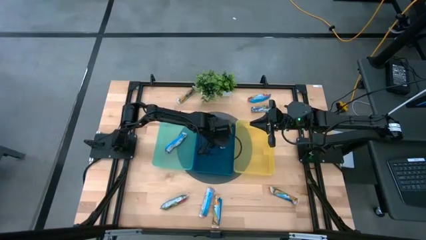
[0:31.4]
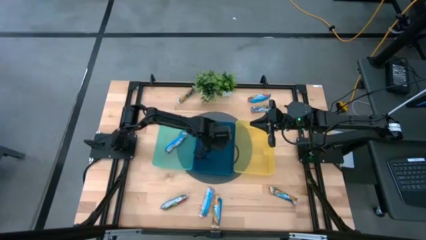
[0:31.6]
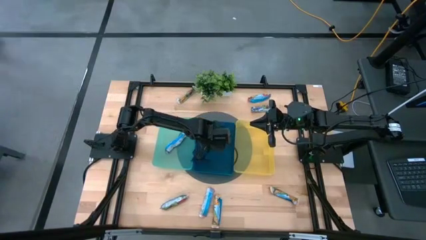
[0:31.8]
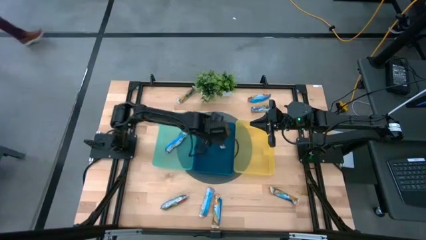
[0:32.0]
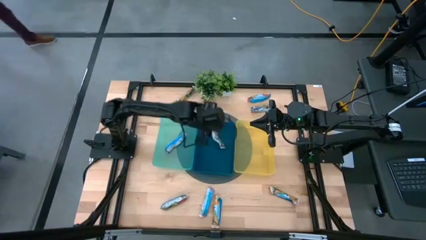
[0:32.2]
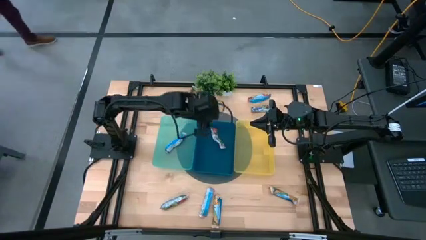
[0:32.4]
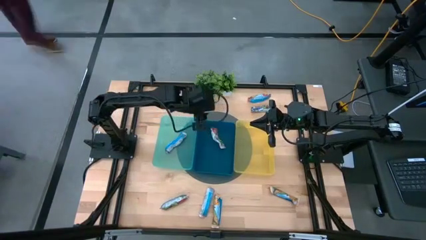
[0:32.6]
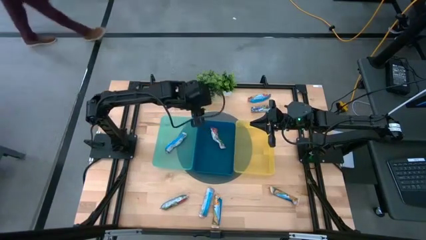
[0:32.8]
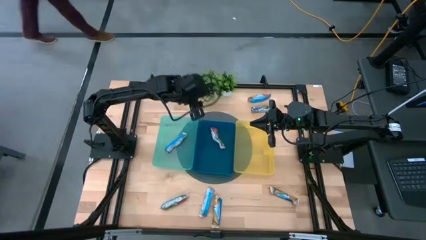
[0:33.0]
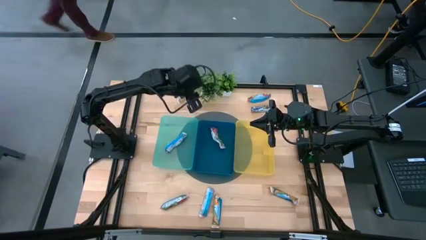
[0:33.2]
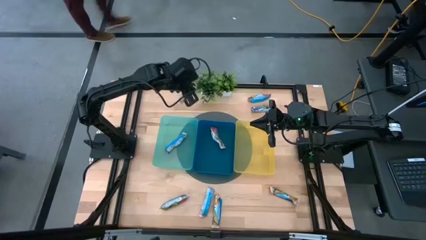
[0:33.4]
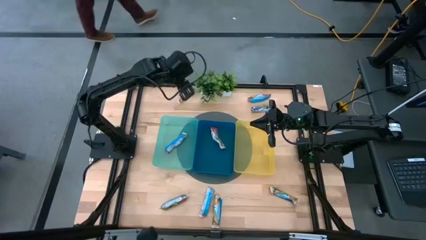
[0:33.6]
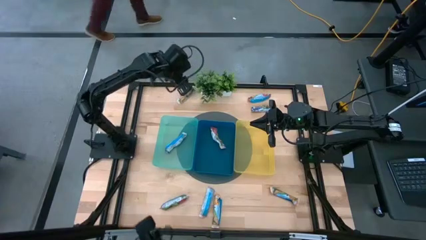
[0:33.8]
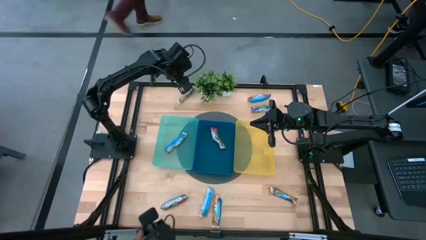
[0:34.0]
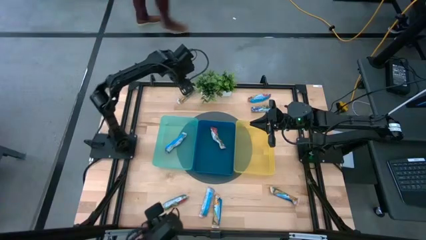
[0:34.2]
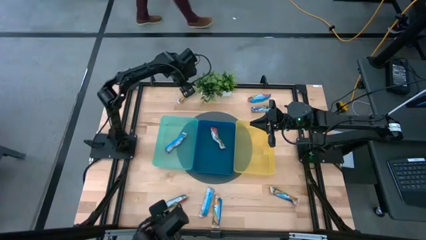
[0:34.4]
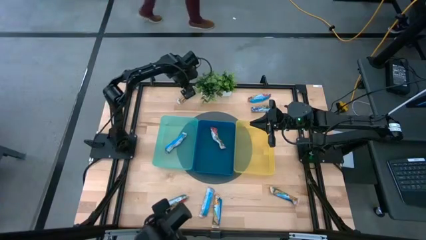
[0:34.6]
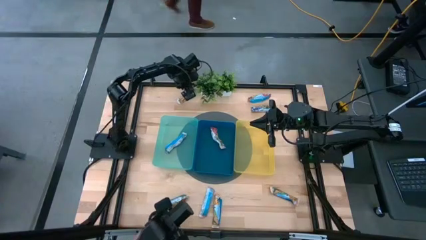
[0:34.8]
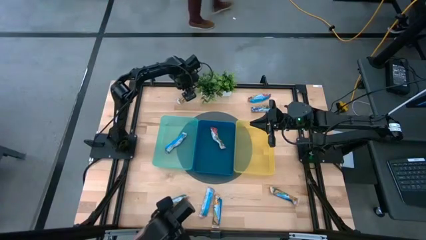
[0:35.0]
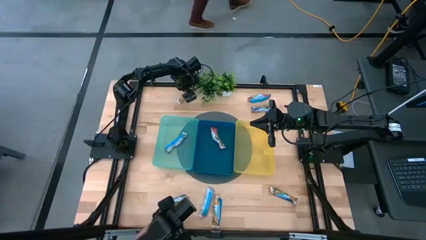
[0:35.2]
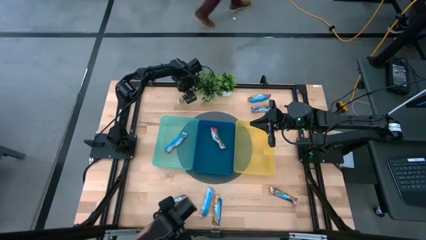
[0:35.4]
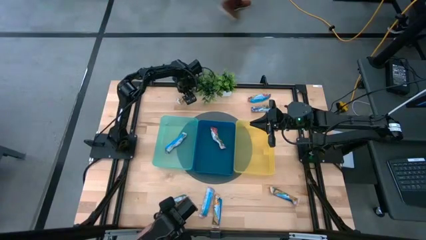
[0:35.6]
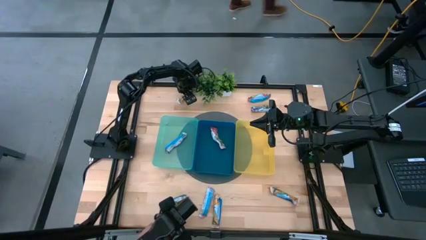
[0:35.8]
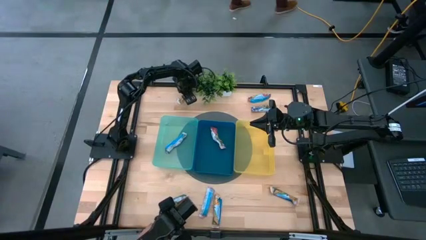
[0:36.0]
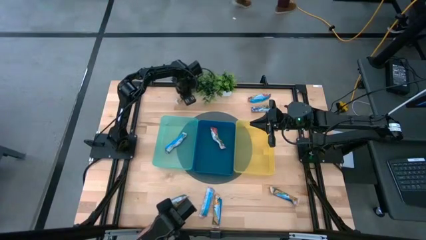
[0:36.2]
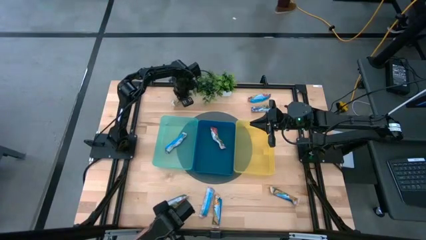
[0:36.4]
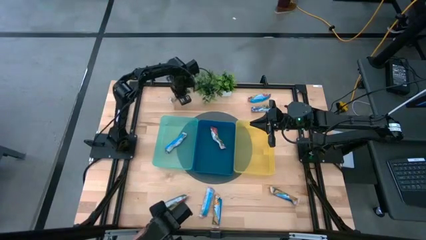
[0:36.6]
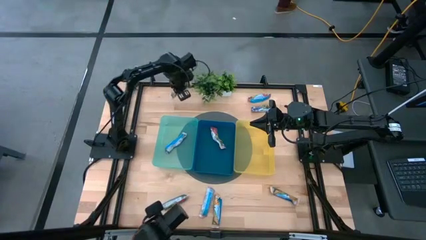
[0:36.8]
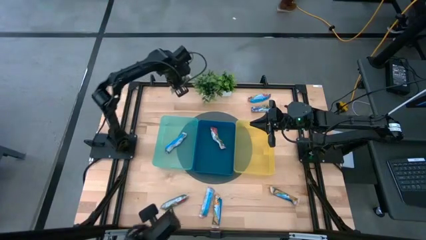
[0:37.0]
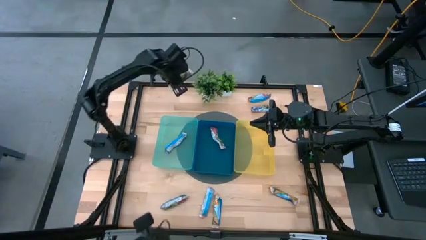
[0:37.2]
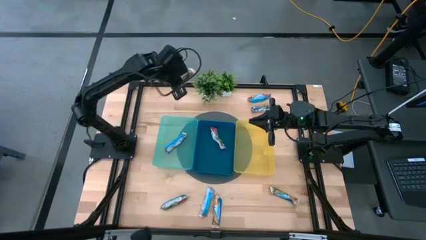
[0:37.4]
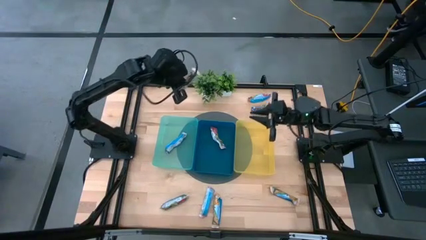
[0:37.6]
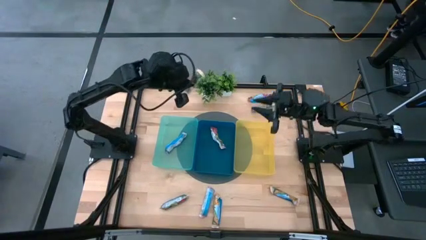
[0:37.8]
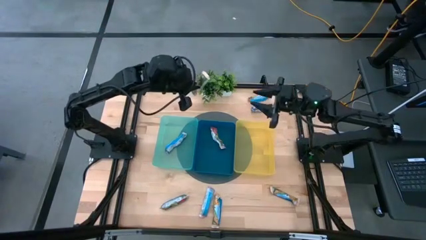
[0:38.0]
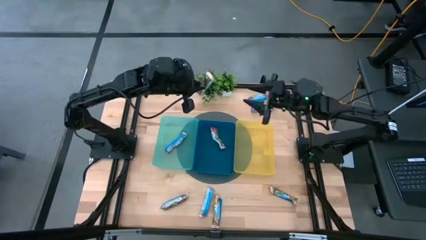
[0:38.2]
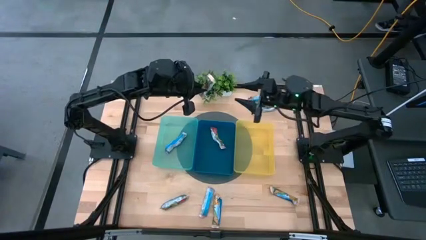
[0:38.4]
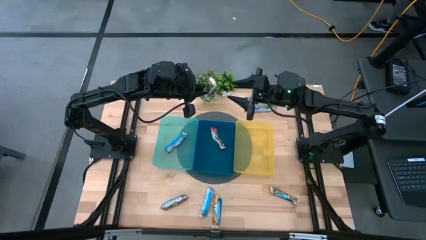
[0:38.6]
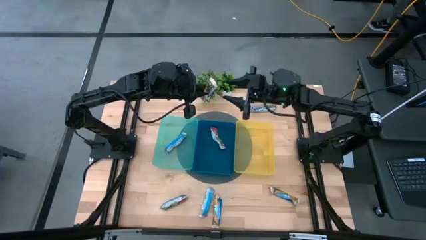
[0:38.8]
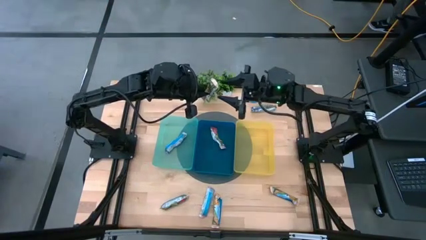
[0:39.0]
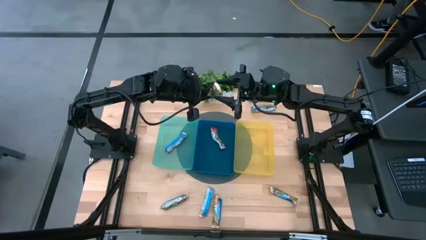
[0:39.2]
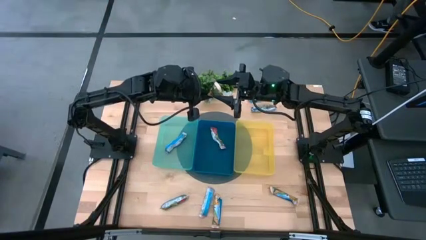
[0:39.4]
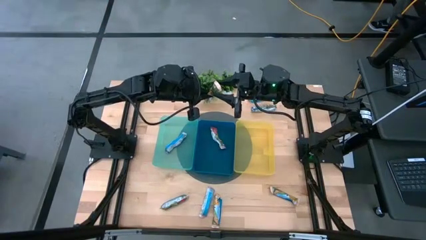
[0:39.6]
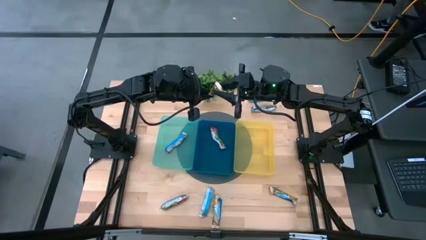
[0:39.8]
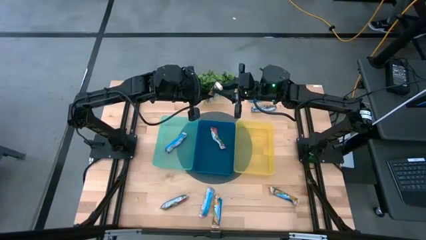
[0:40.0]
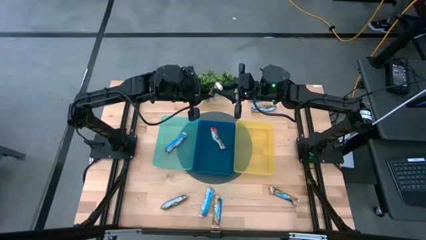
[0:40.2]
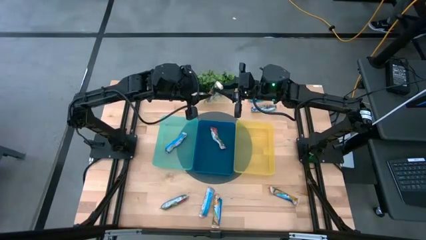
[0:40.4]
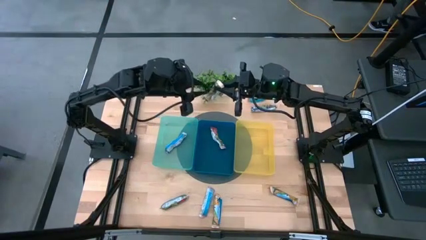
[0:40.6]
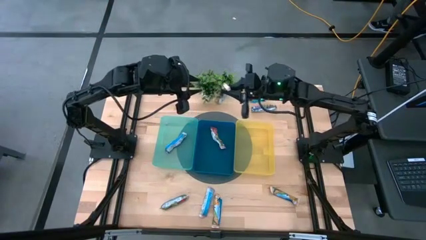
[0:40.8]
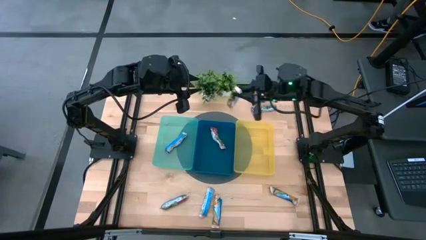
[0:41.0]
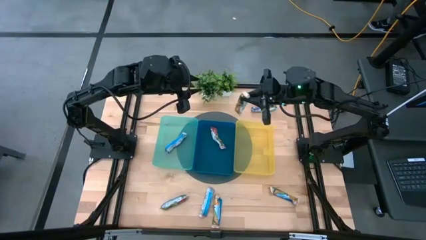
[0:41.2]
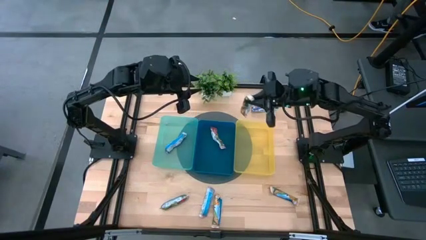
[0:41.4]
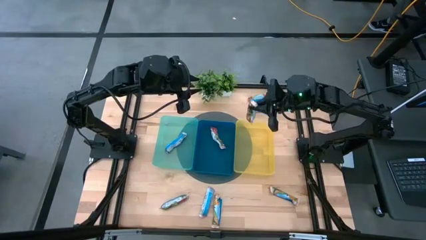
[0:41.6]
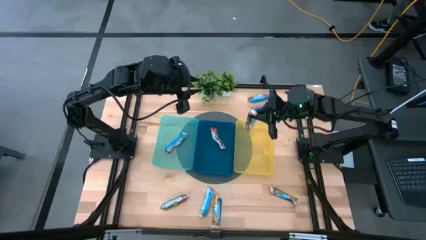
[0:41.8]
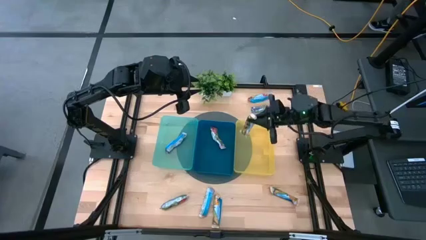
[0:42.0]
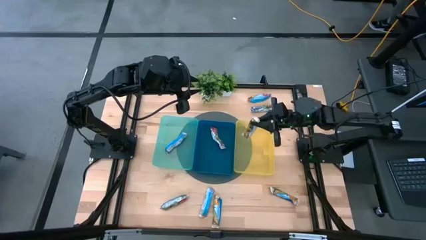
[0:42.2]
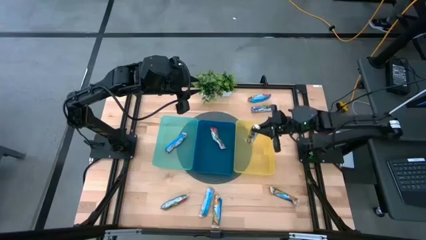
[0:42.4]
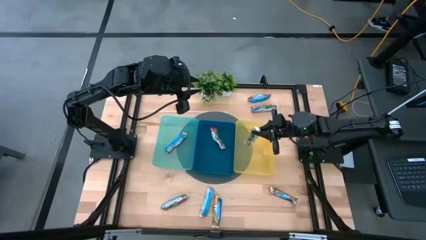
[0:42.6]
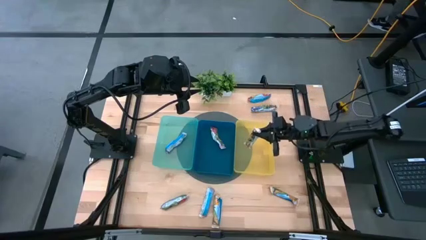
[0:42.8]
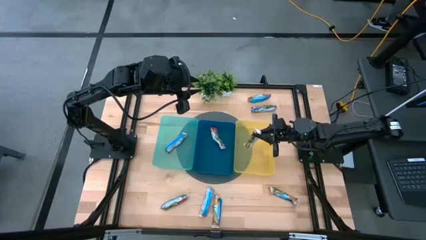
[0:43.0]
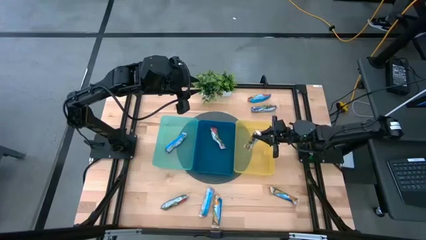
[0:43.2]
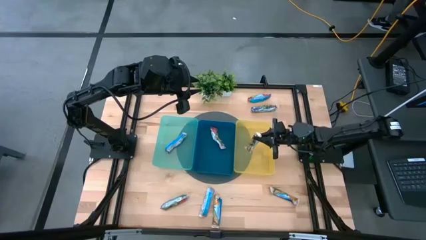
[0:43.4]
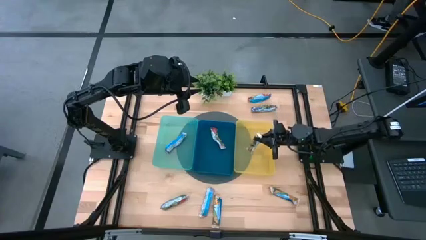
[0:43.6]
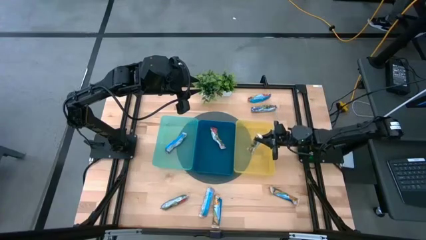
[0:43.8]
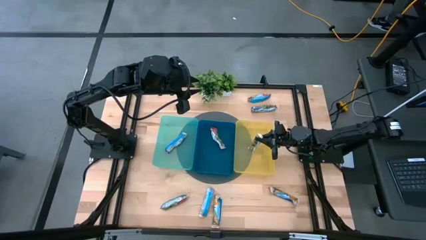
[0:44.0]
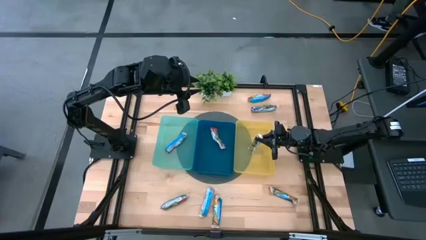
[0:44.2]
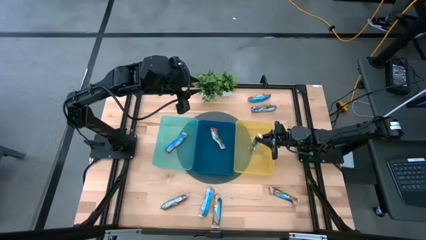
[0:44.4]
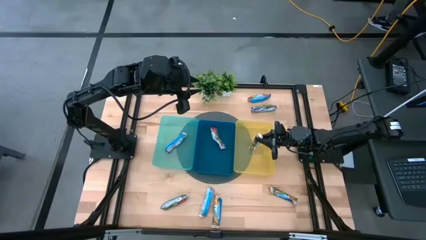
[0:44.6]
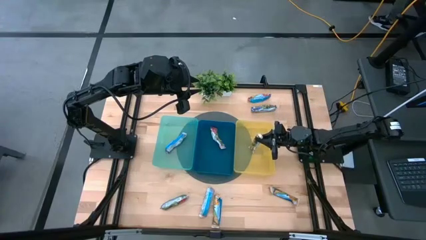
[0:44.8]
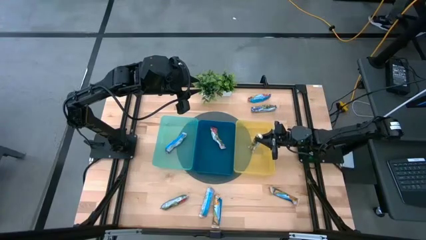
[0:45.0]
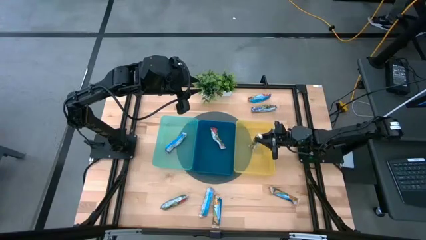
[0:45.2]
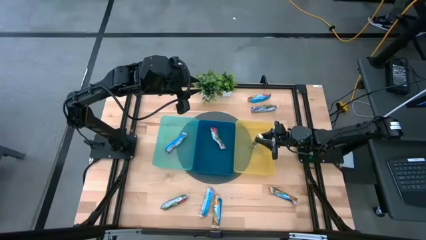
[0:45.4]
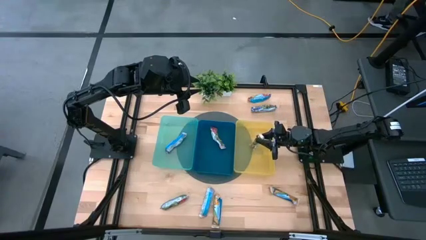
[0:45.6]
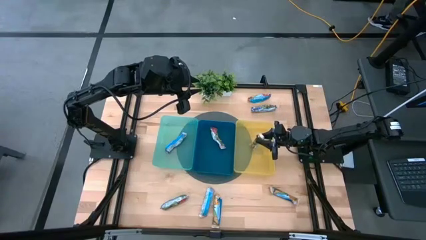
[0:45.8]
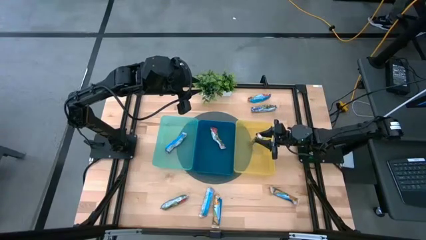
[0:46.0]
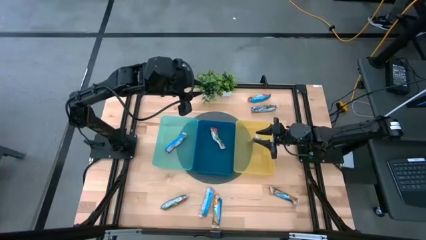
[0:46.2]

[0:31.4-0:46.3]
Task: Pick and place Granola Bars by type
Put the yellow granola bar into the yellow bin
